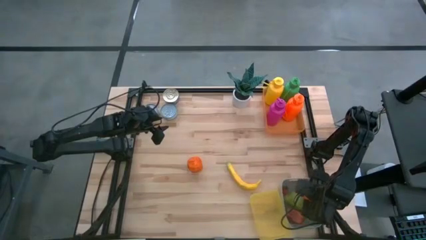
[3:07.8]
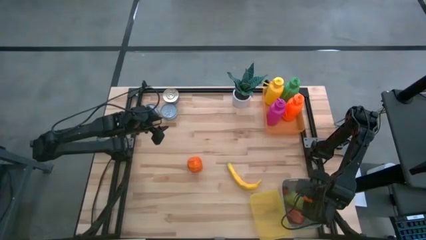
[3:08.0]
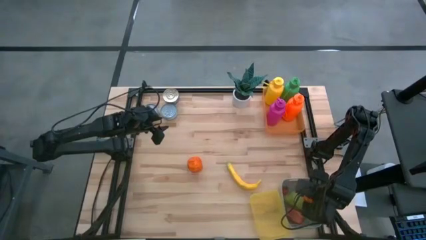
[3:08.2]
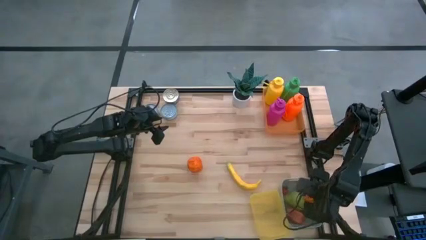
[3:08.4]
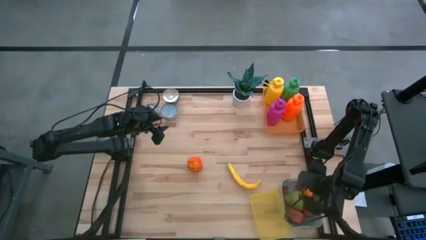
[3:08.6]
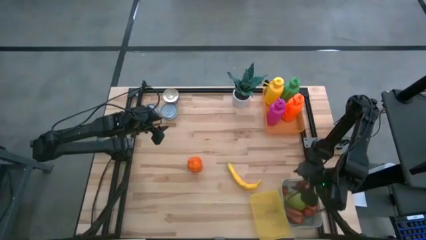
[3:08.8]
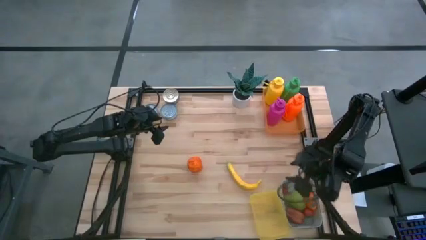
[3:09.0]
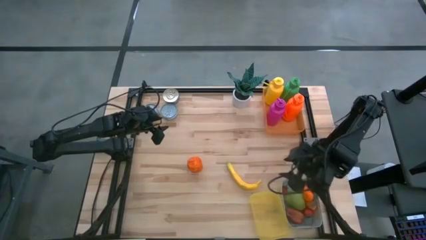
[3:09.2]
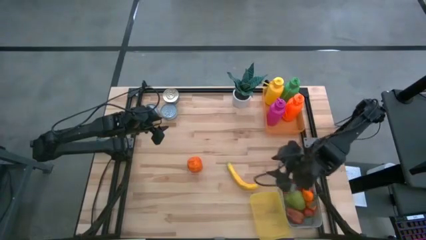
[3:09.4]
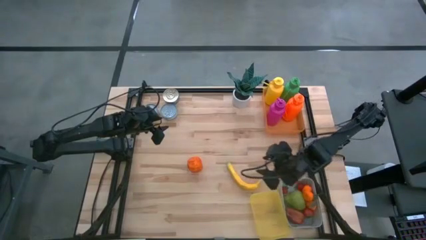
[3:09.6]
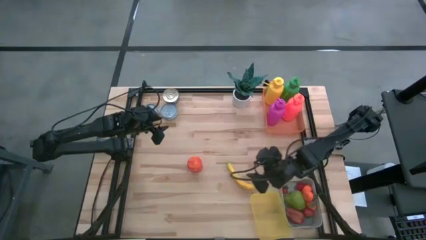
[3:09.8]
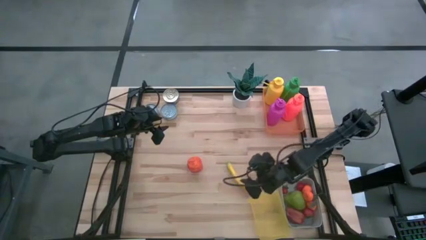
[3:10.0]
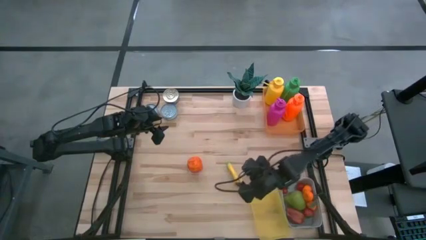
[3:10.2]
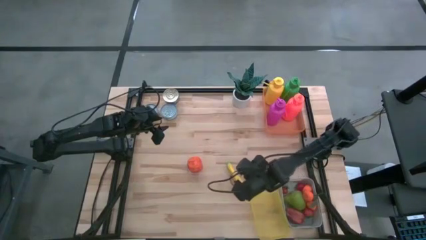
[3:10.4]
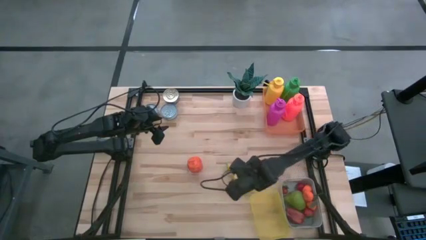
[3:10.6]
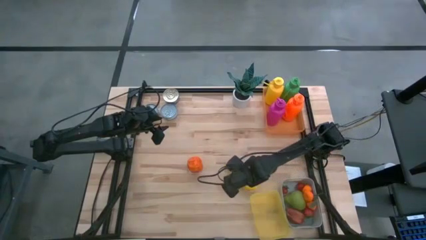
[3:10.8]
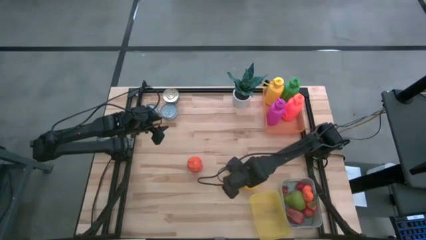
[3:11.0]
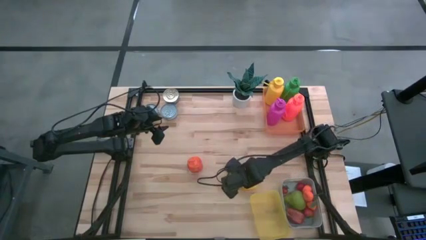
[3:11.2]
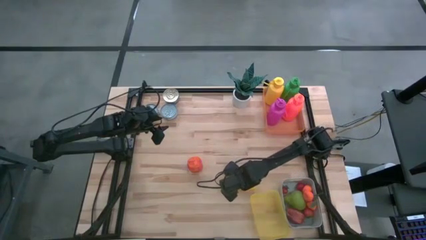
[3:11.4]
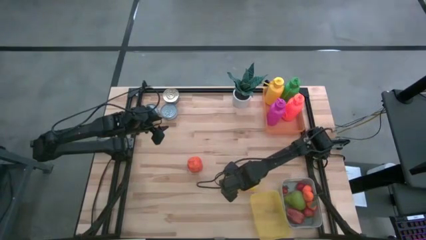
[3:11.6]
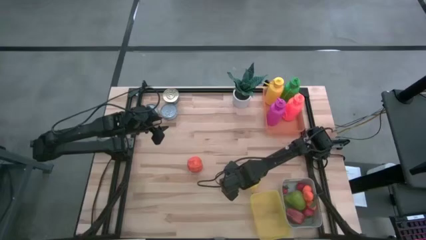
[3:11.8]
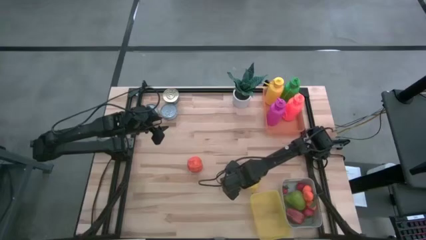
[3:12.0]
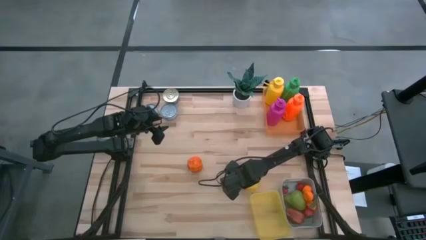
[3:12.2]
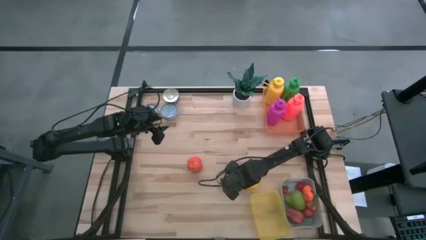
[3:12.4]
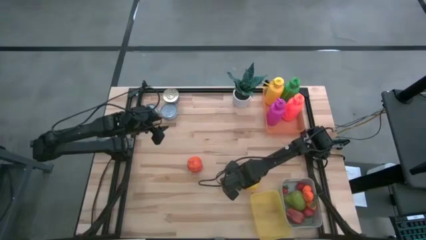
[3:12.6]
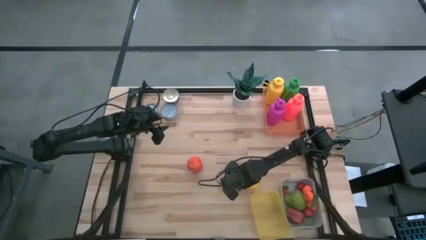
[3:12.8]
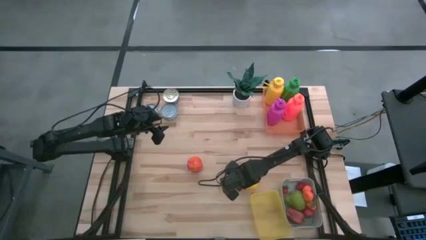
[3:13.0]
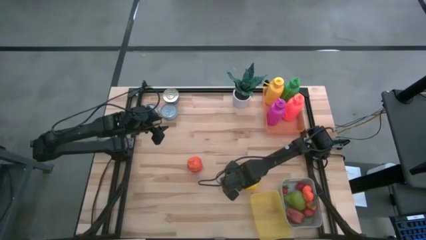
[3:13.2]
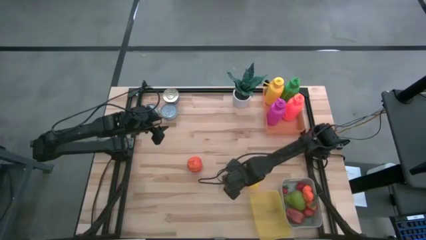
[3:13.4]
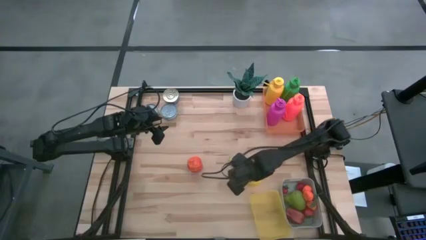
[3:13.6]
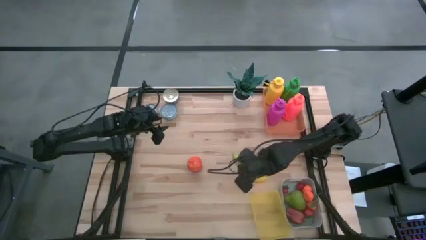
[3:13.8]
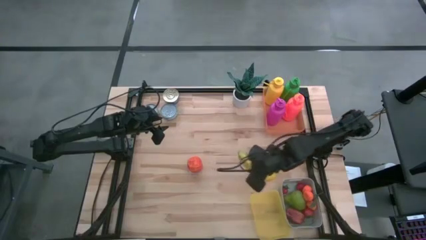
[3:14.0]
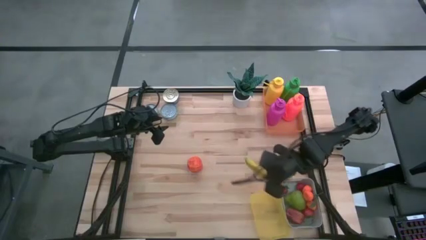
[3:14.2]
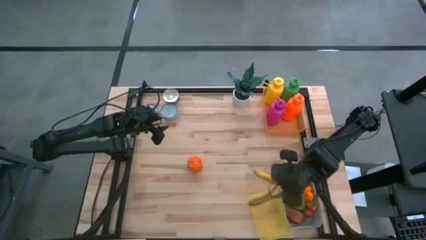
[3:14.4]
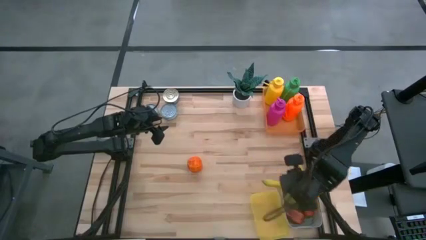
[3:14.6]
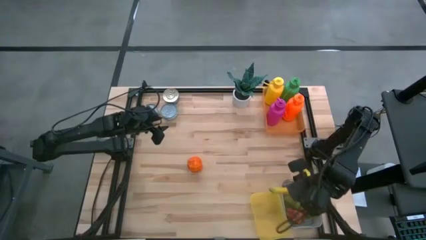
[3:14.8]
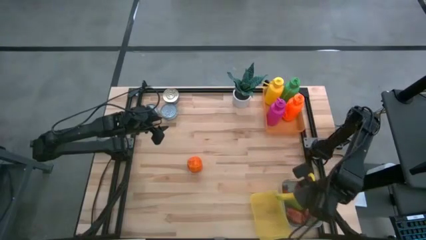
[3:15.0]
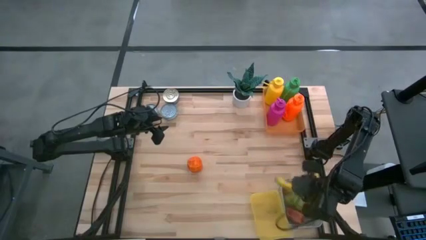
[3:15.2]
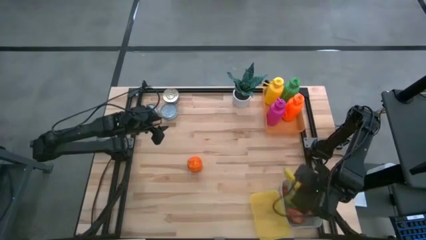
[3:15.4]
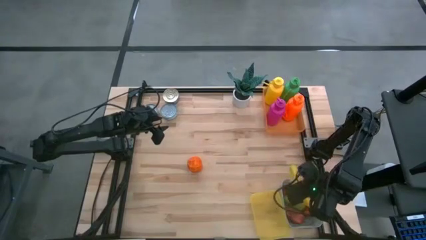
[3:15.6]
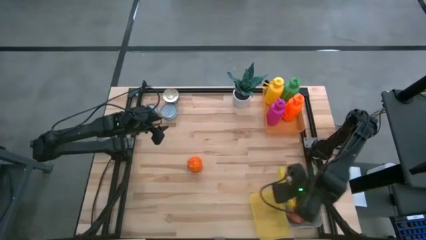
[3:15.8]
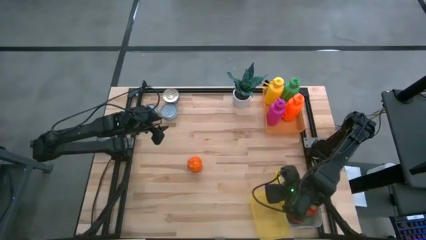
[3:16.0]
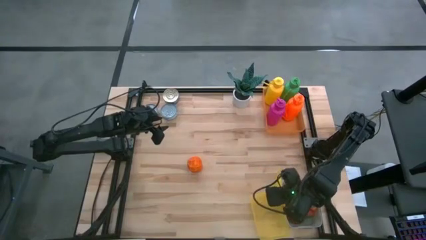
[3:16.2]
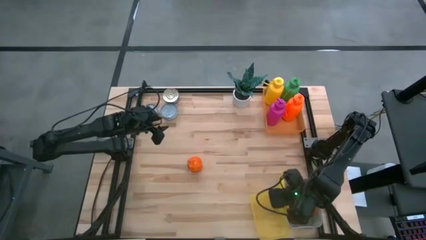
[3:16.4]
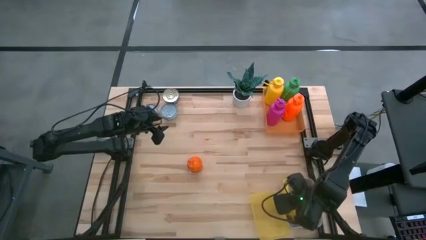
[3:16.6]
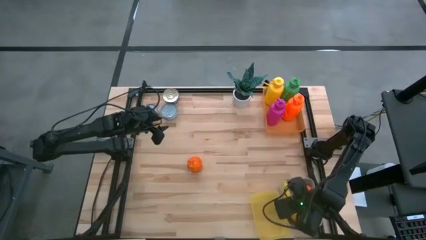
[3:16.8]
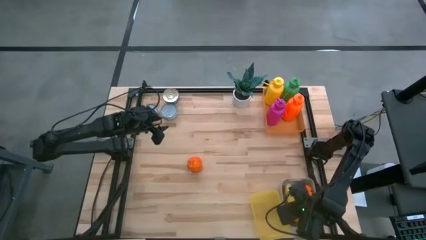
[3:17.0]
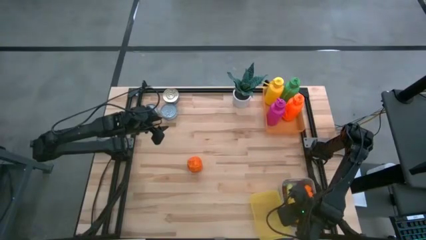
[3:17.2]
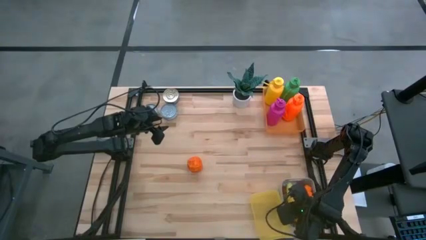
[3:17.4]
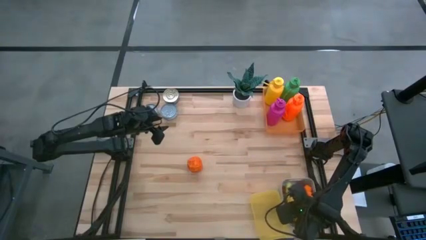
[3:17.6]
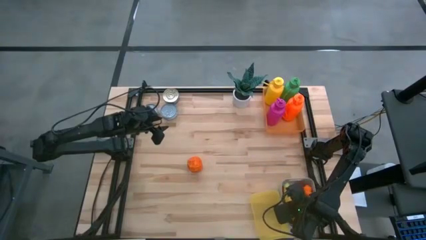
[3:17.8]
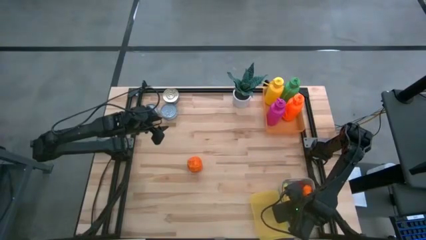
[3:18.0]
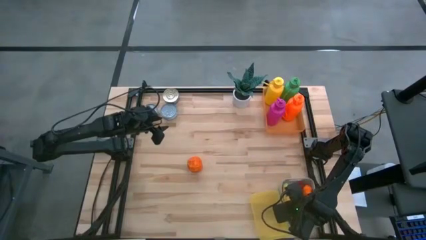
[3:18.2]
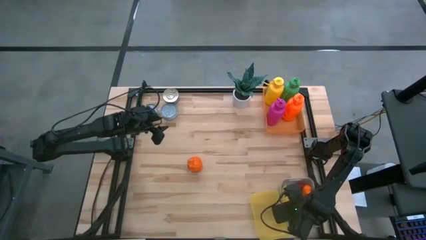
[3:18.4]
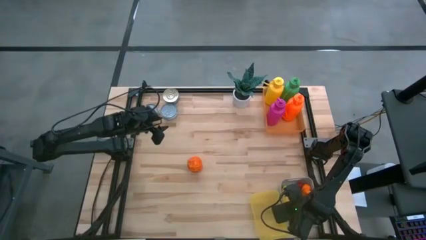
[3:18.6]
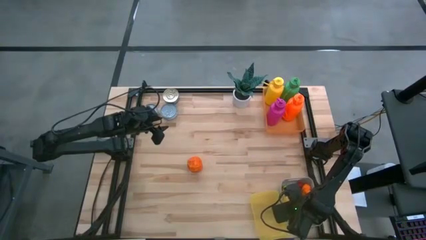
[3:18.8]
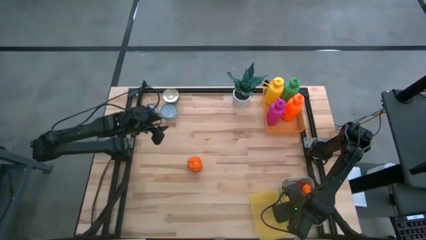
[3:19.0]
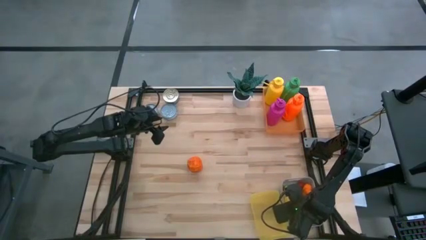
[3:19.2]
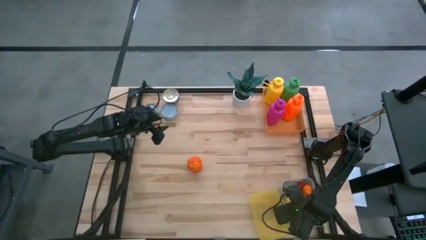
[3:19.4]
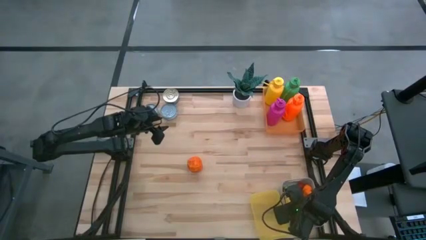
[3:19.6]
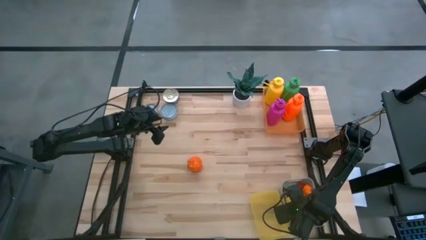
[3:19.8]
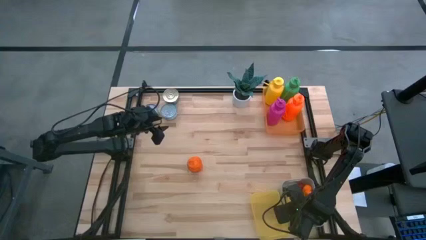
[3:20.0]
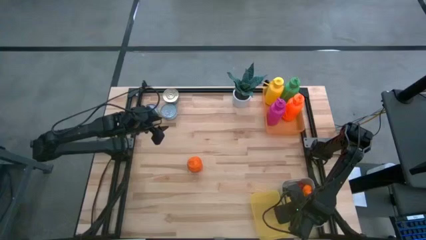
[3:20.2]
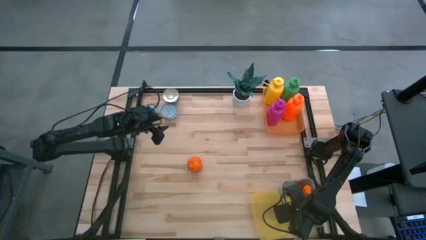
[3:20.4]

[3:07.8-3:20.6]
Task: Pick & Place Food Item
Put the yellow banana into the gray bin
